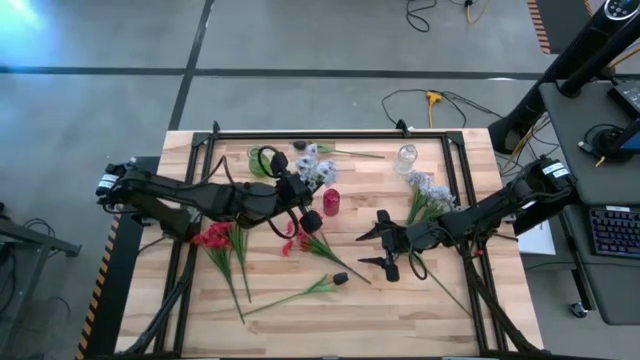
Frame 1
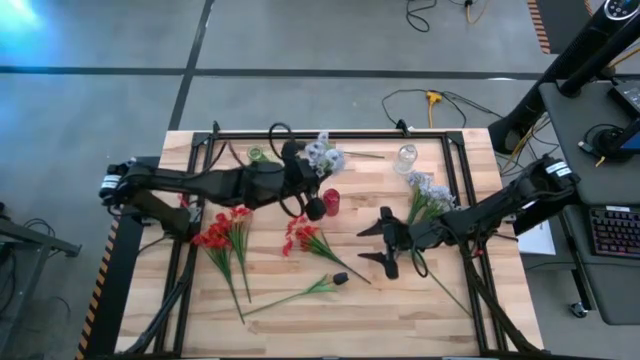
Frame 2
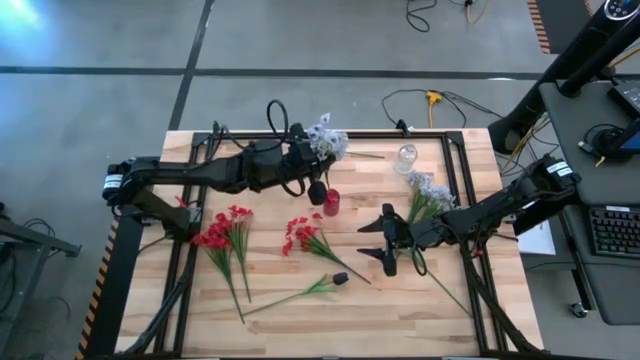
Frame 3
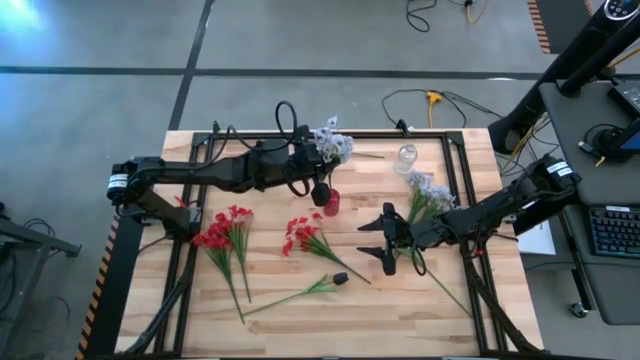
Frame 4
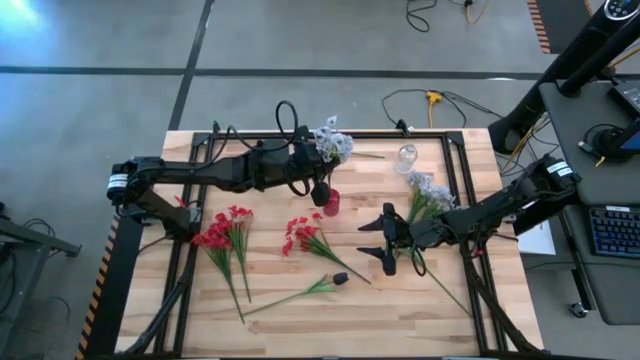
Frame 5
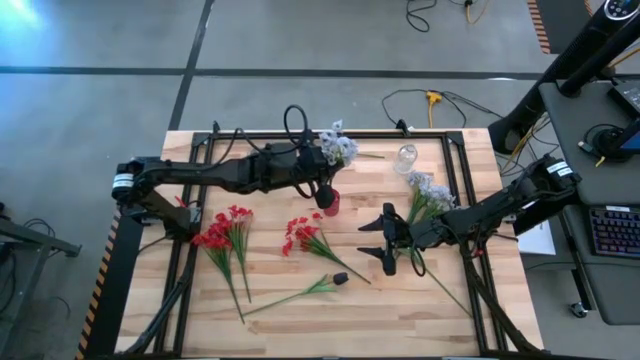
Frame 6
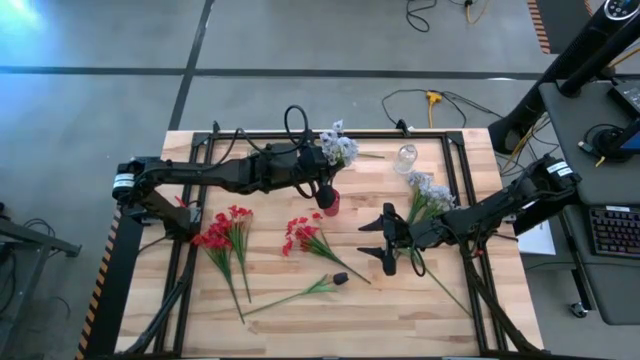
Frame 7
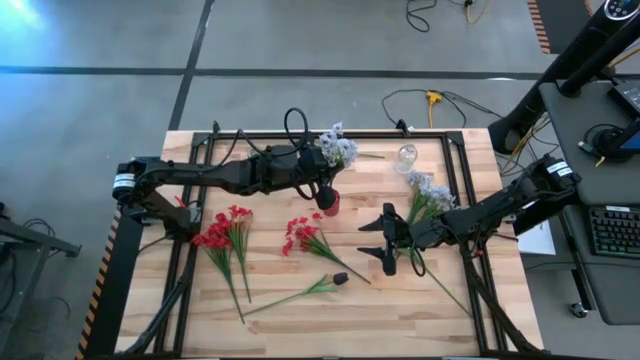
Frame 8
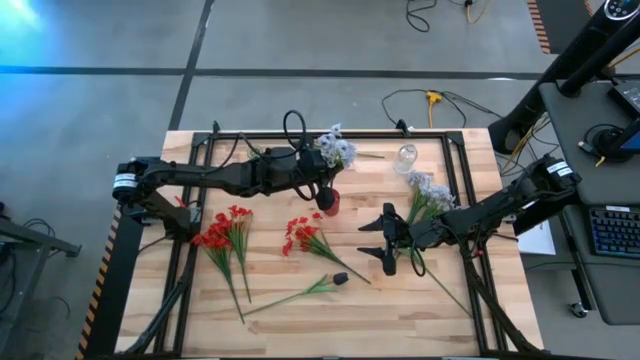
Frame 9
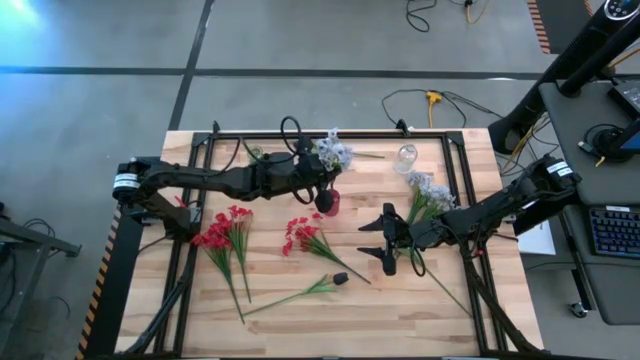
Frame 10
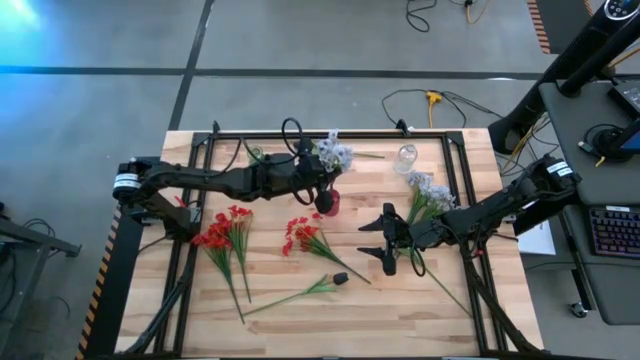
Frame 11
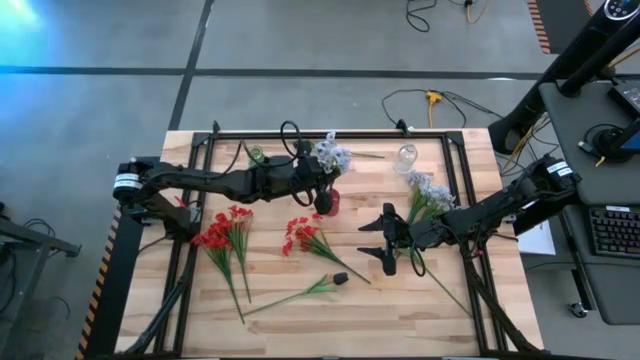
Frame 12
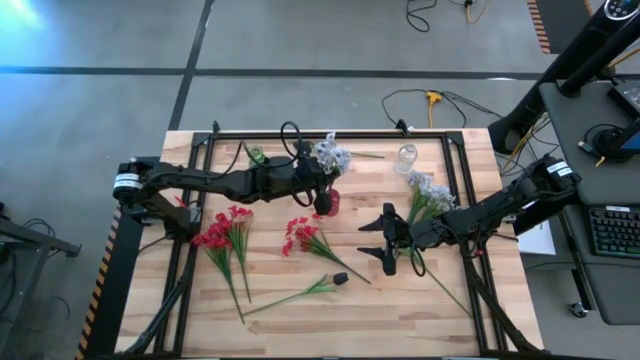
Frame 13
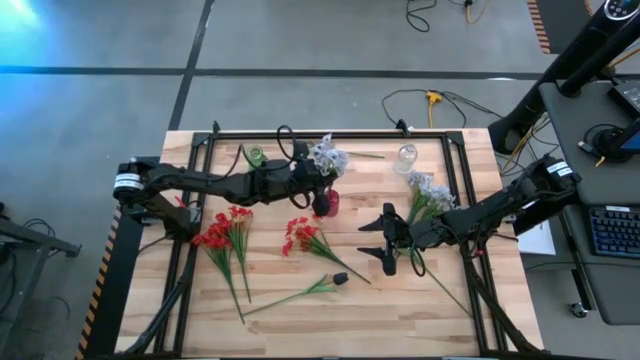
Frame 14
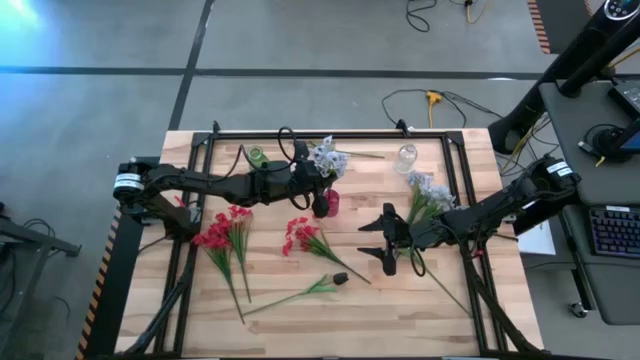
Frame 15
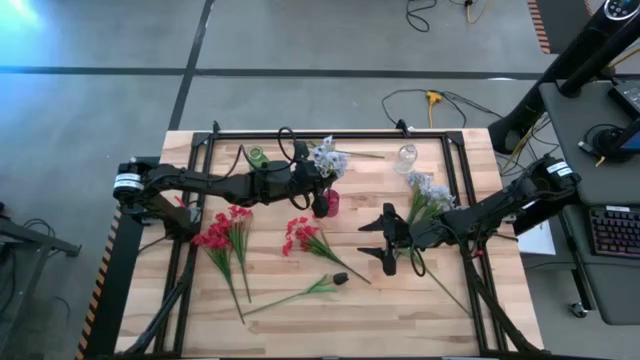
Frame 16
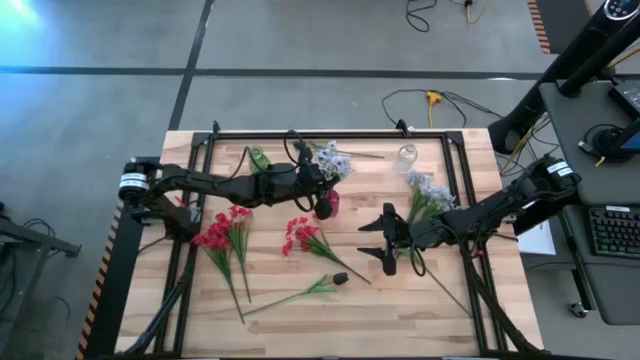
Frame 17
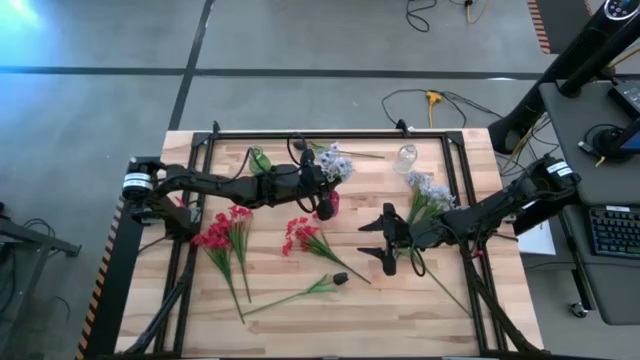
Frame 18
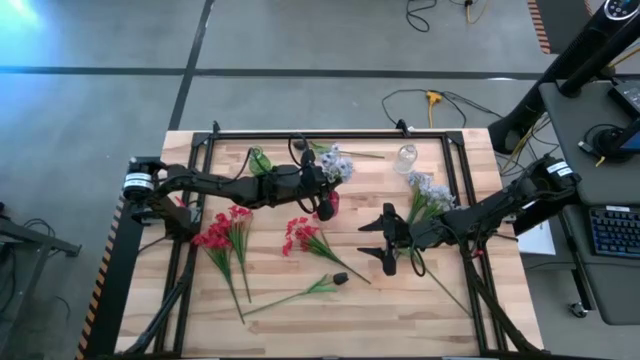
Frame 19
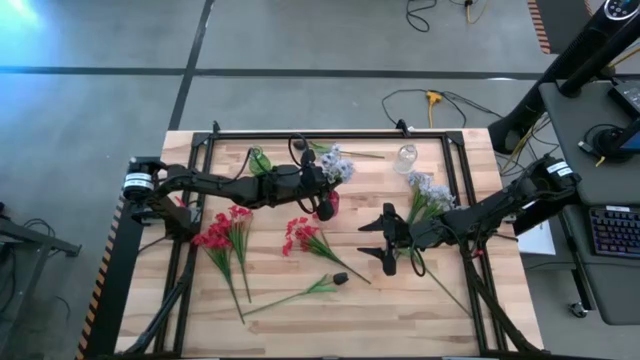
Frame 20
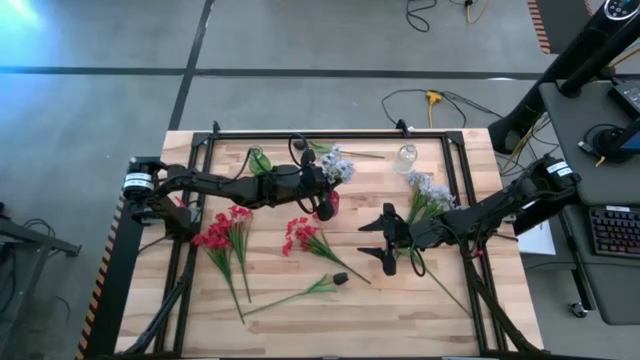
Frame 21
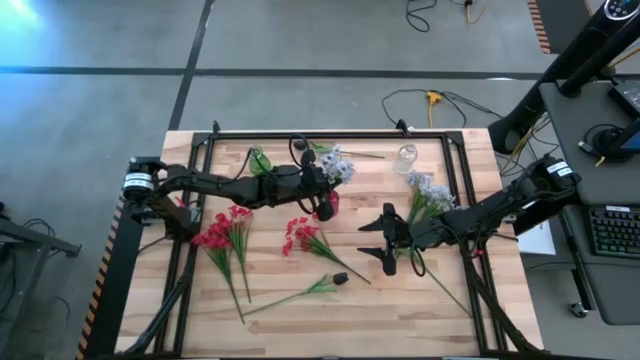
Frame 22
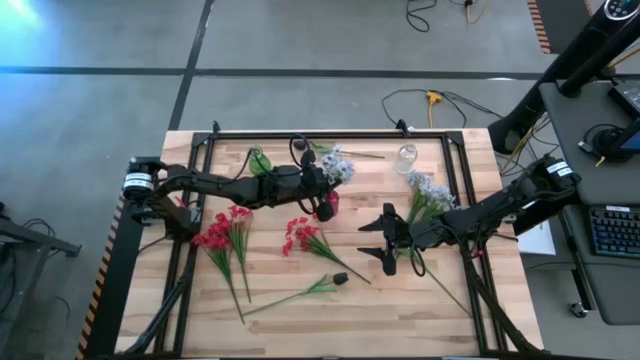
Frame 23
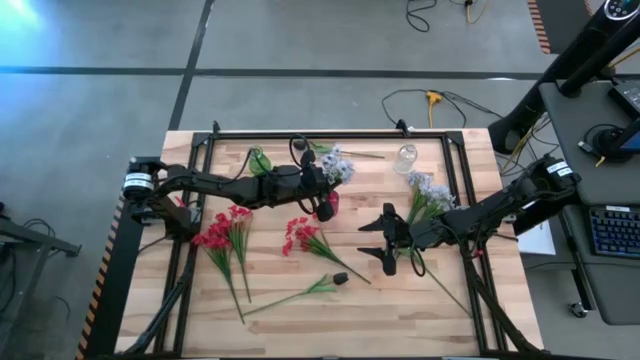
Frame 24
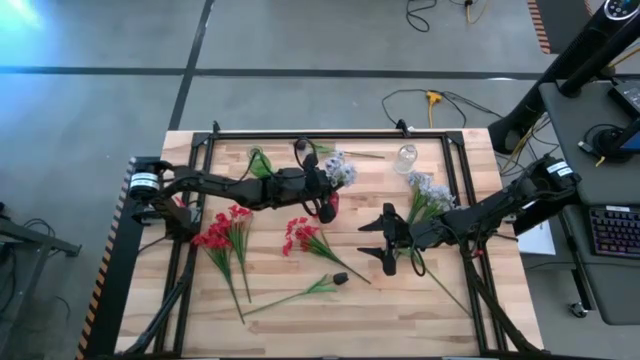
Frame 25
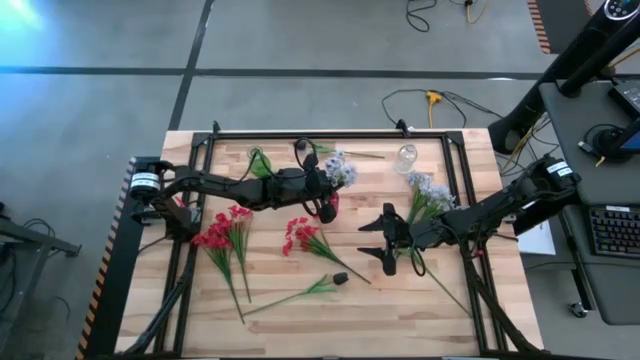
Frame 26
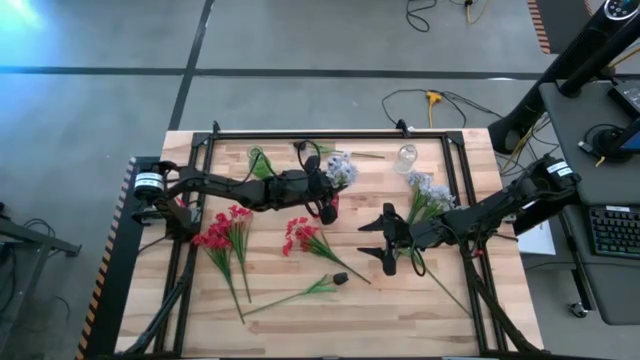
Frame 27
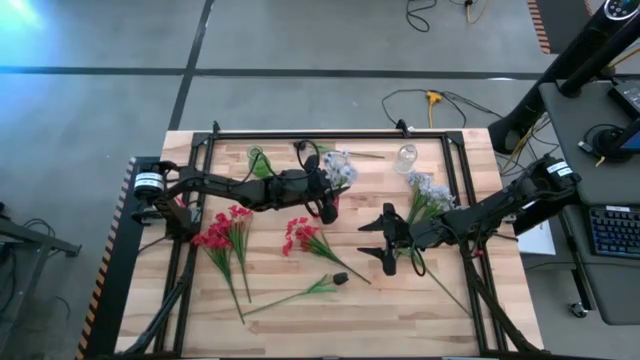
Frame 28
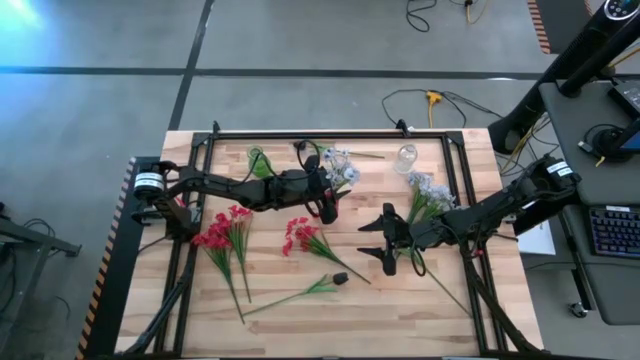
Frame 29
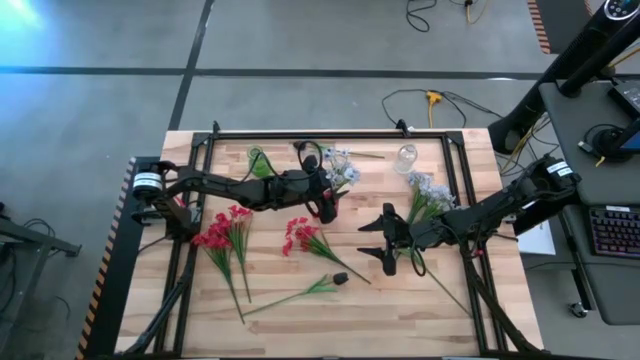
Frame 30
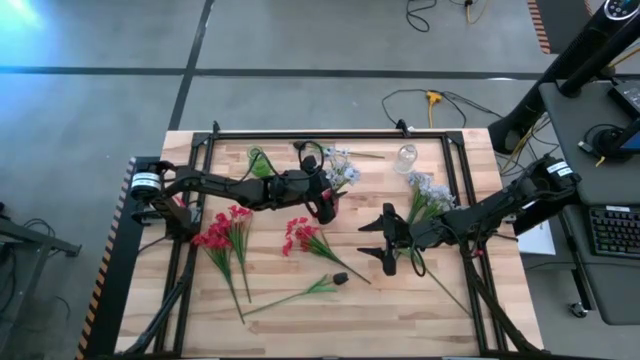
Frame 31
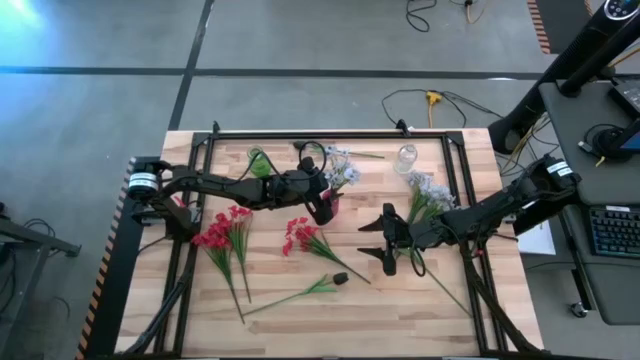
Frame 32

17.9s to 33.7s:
Task: Sort flowers into vase by color
Put the left white flowers into the red vase

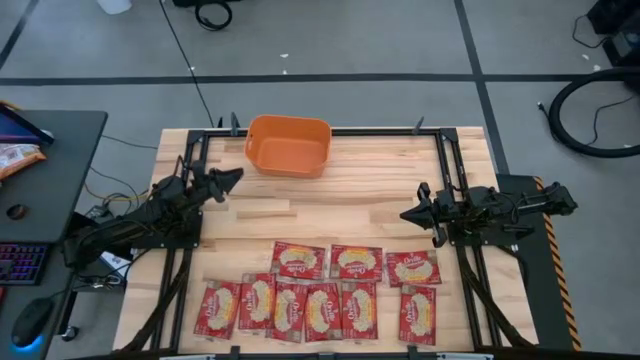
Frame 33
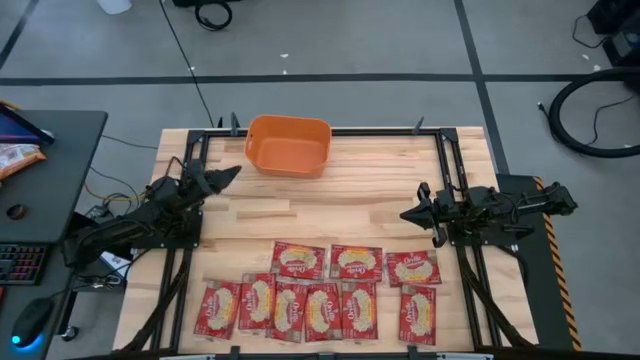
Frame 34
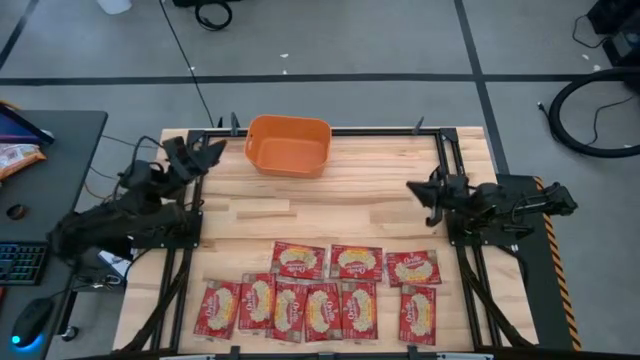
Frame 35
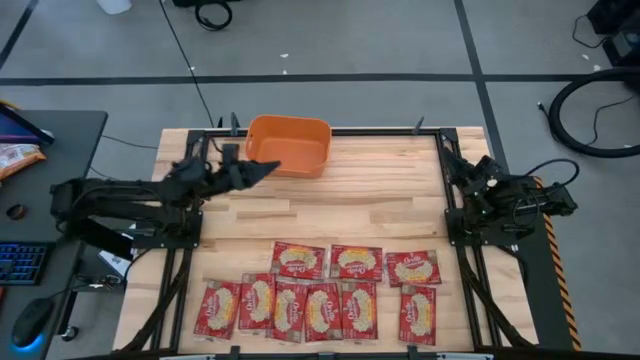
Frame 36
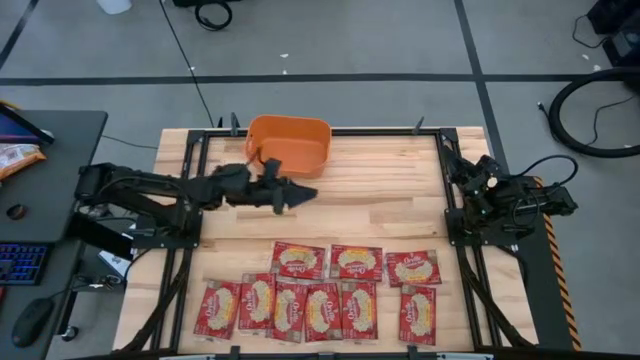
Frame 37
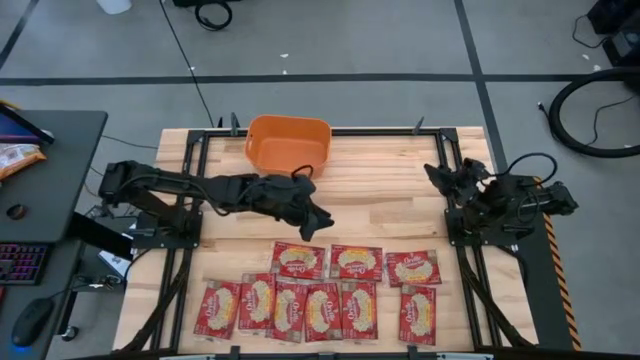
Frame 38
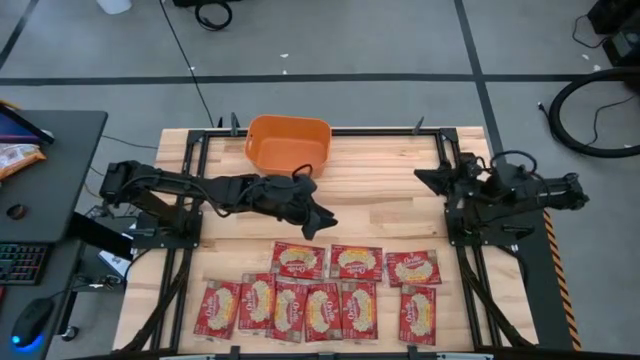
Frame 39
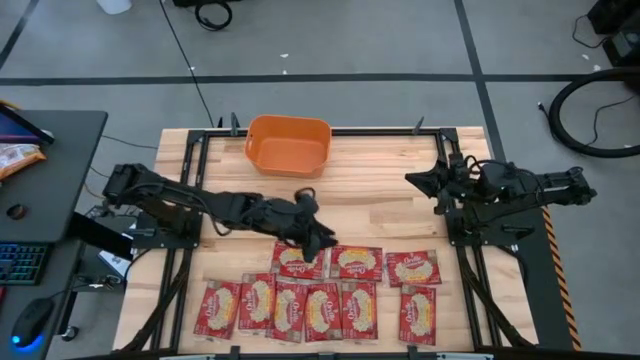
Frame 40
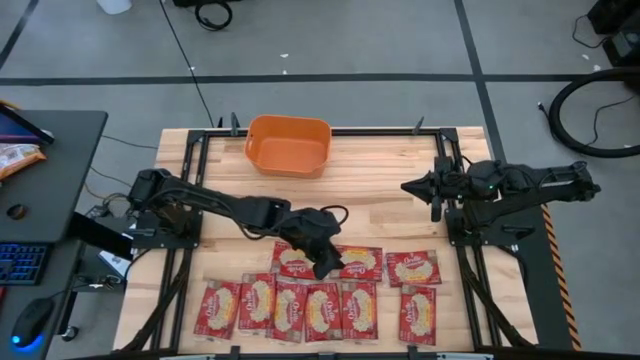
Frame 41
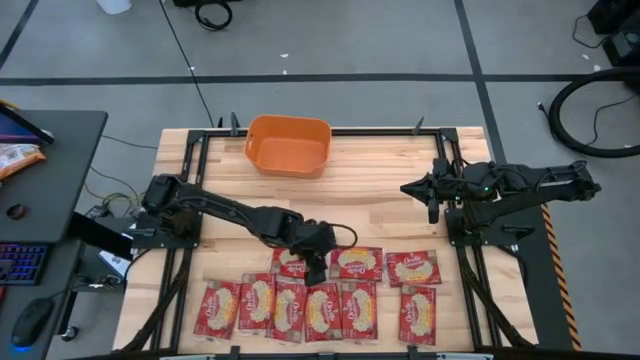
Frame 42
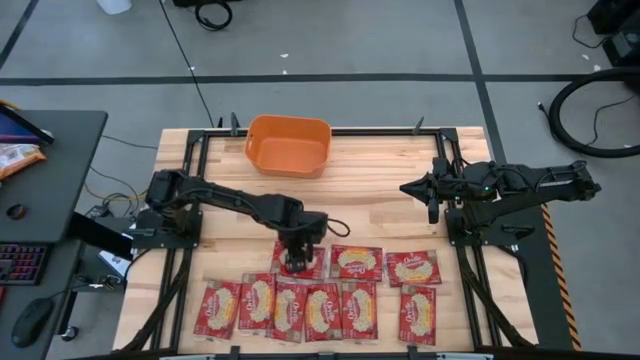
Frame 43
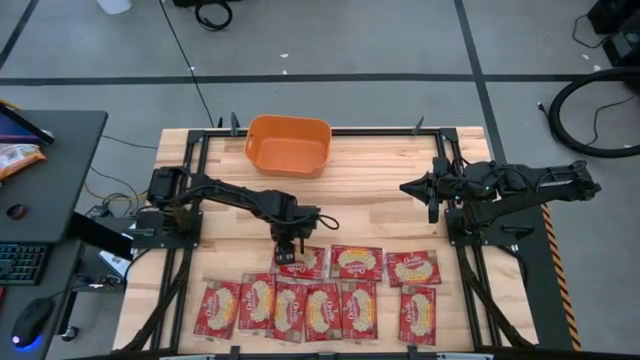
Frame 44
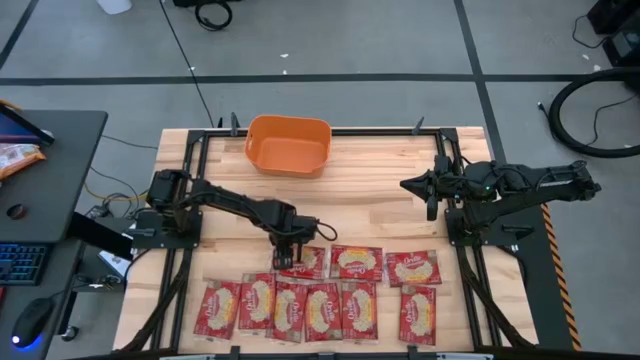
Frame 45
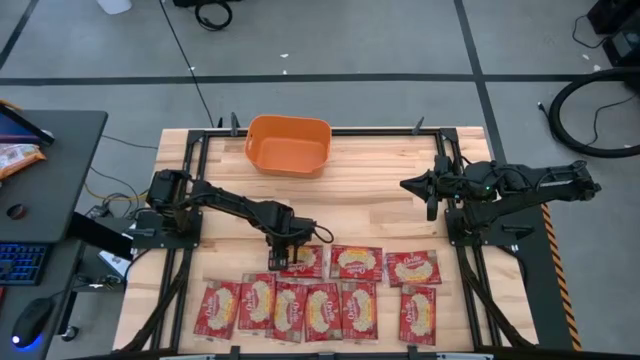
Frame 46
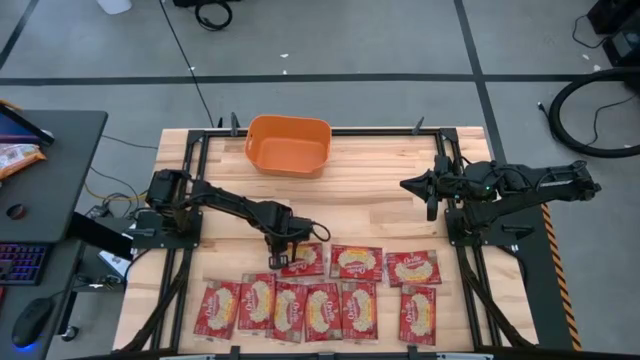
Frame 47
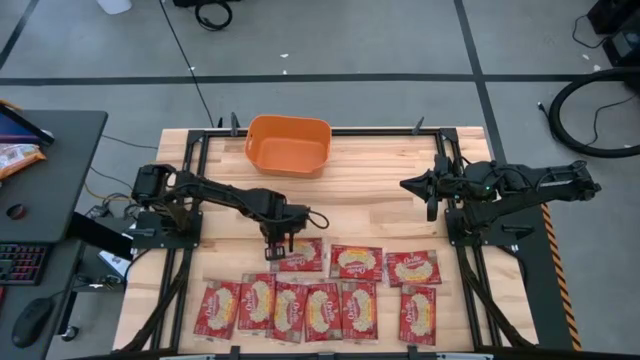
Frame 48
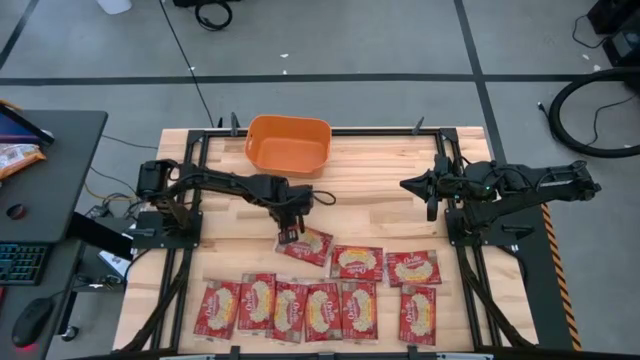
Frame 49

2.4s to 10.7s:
Task: Sort popcorn bags into baskets
Put the red popcorn bag into the orange container
